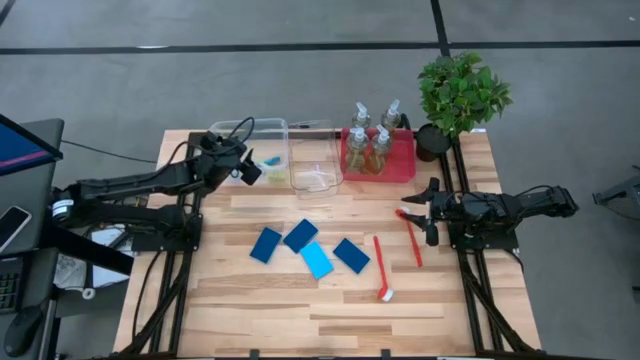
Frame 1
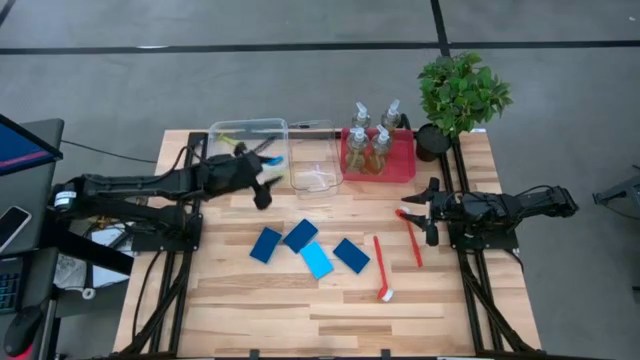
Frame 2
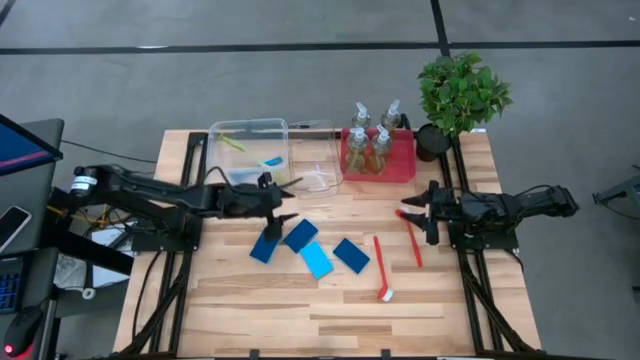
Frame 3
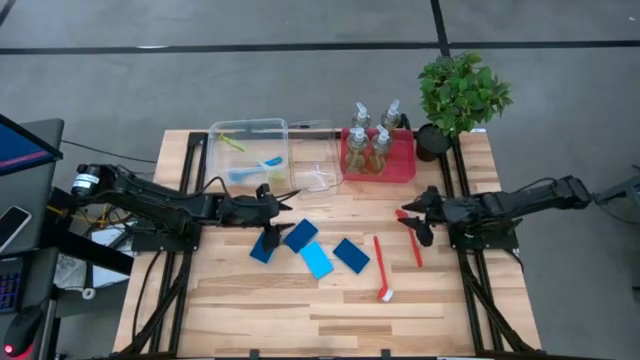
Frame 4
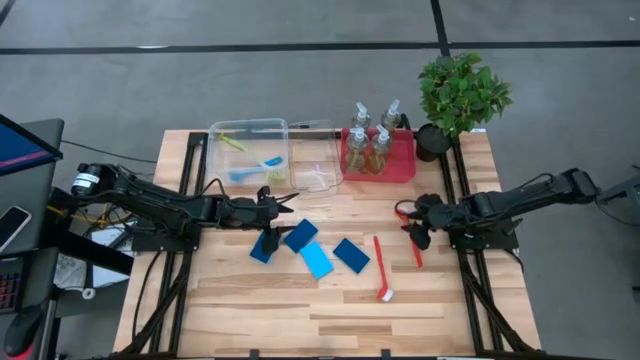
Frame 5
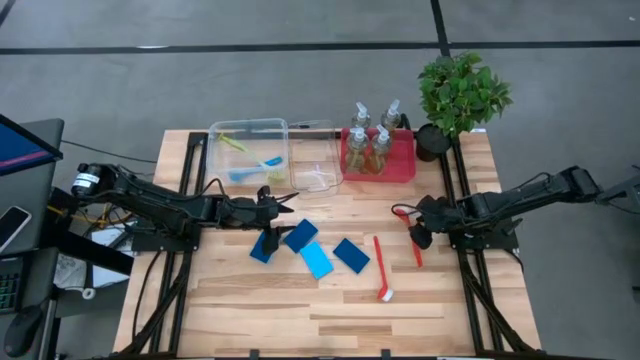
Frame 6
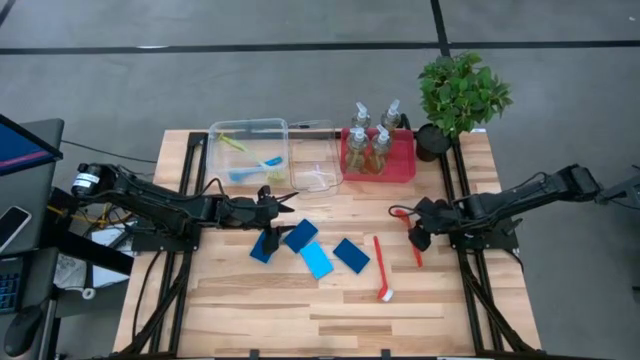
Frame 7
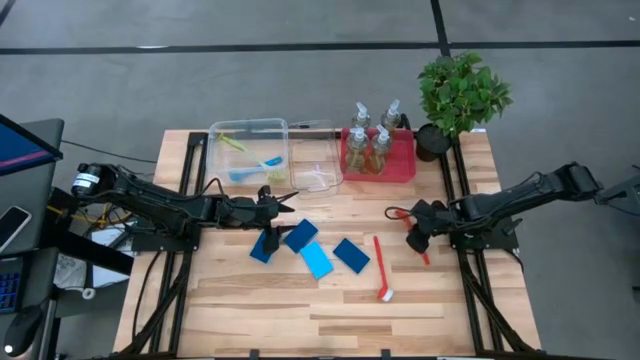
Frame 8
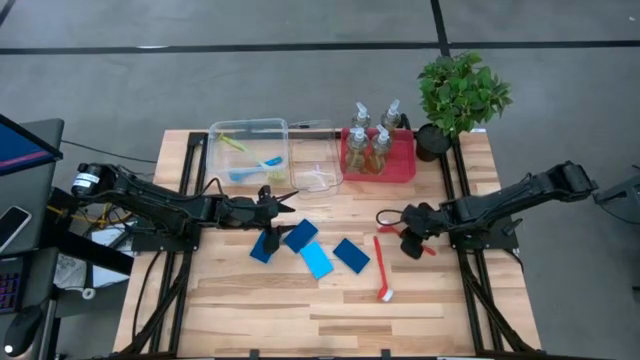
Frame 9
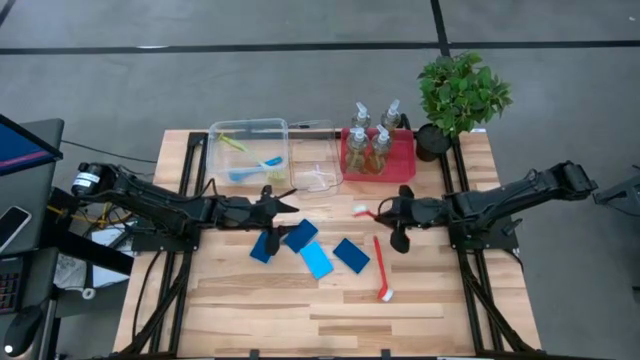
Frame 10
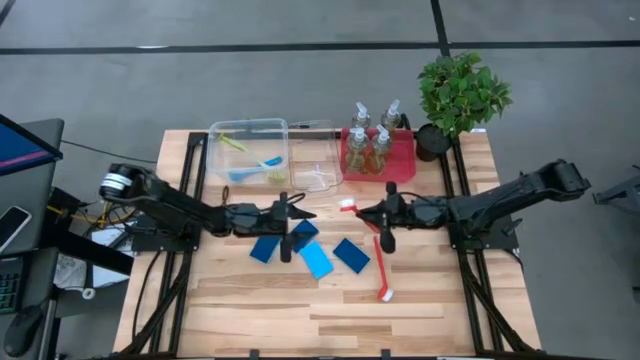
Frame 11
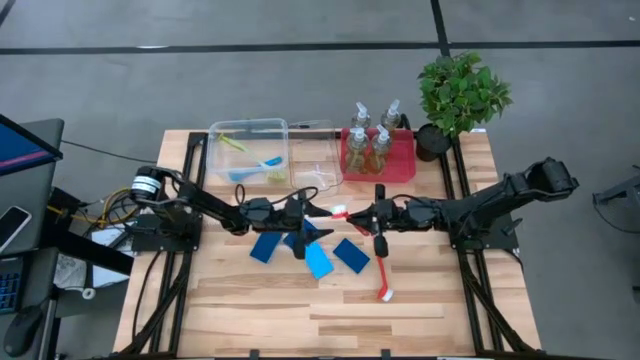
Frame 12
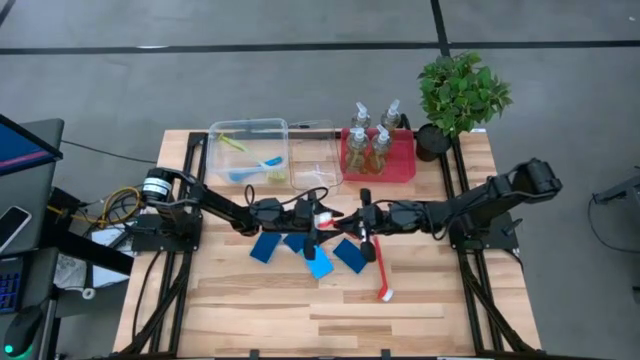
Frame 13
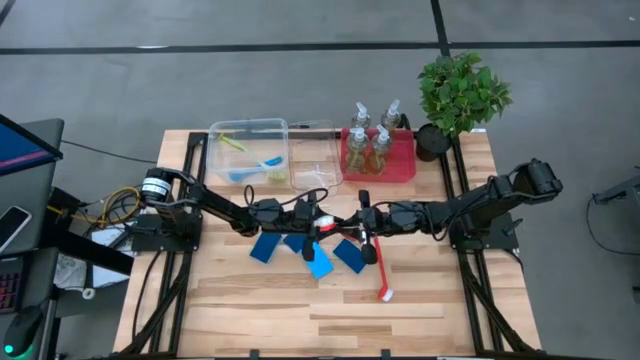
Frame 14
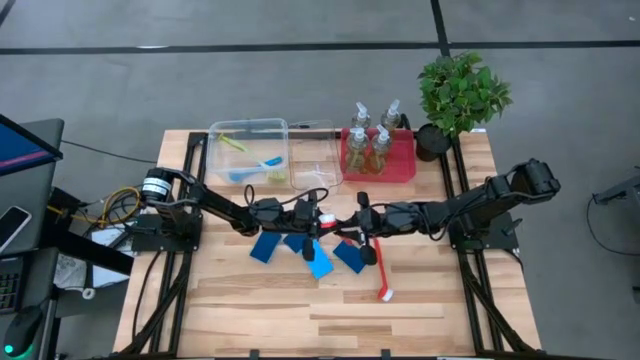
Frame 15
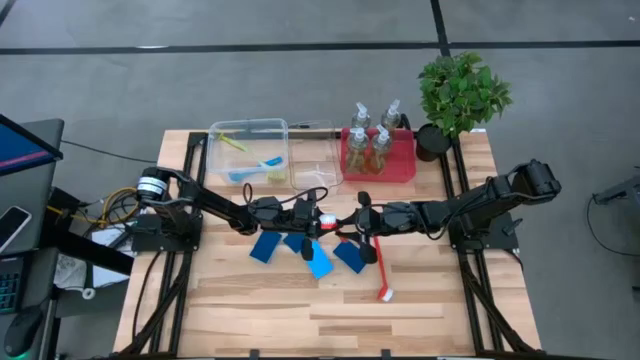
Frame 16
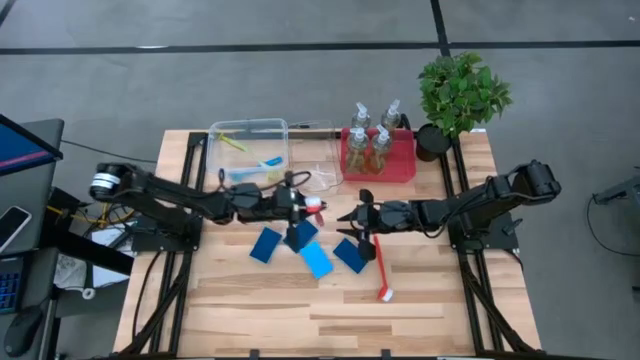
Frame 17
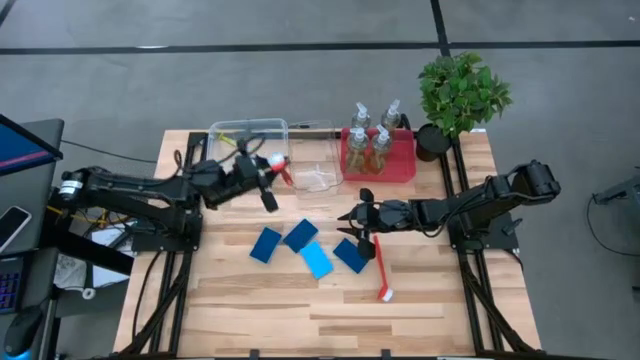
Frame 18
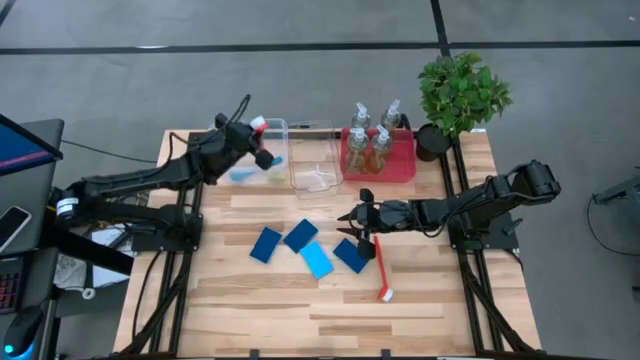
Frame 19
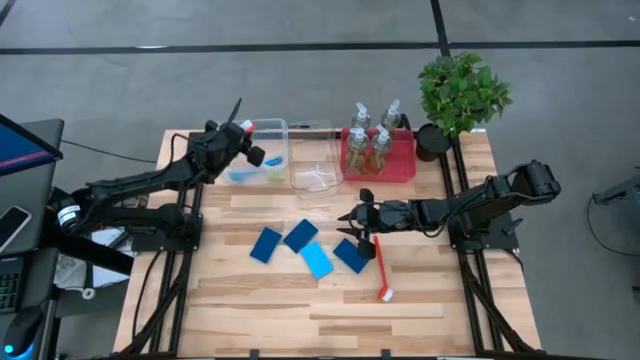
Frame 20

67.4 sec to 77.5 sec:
Task: Pick & Place Kitchen Sink Supplies
Put the red dish brush into the white bin

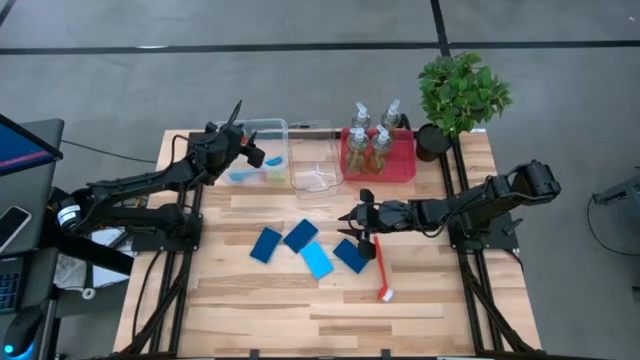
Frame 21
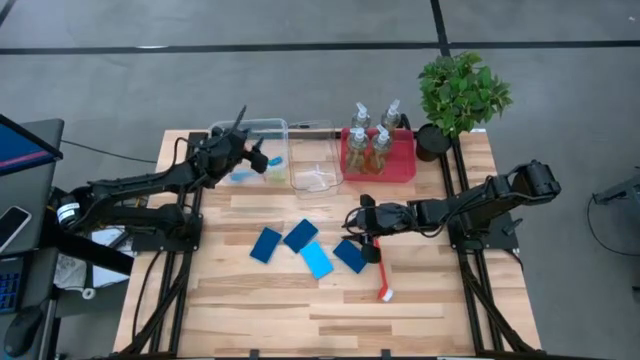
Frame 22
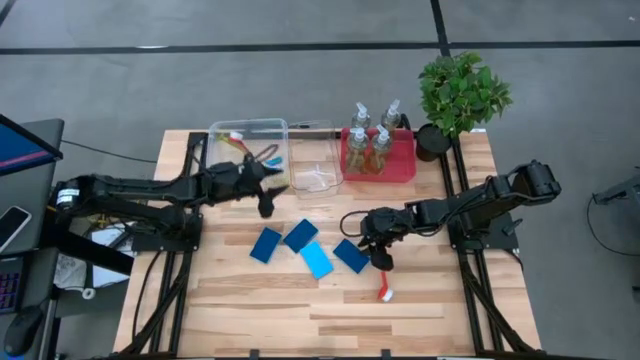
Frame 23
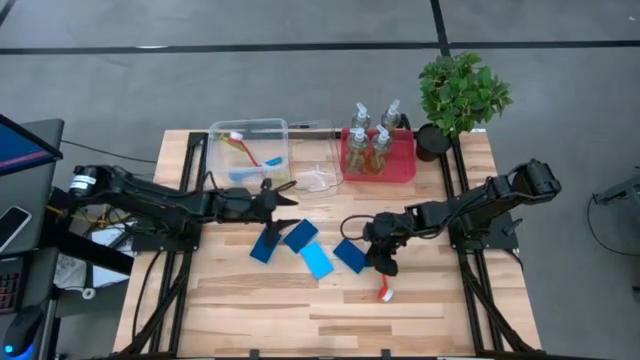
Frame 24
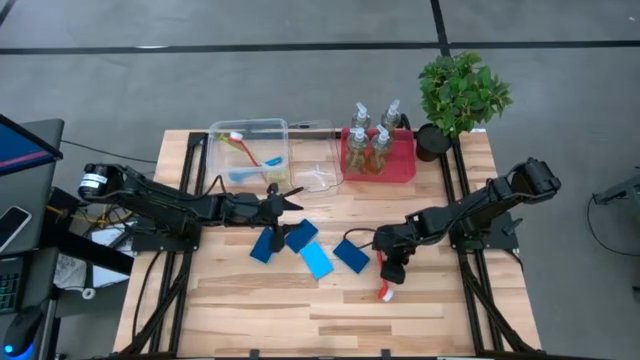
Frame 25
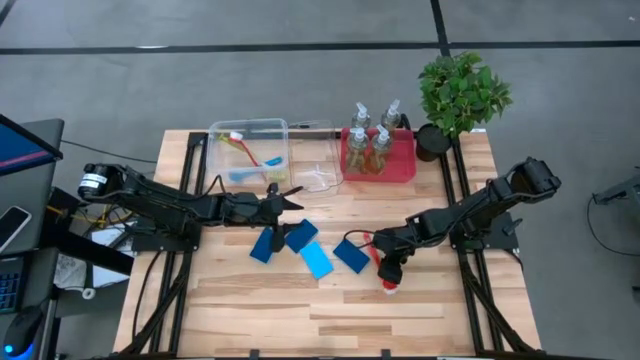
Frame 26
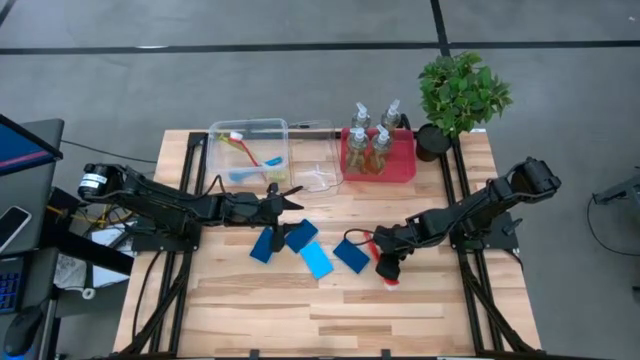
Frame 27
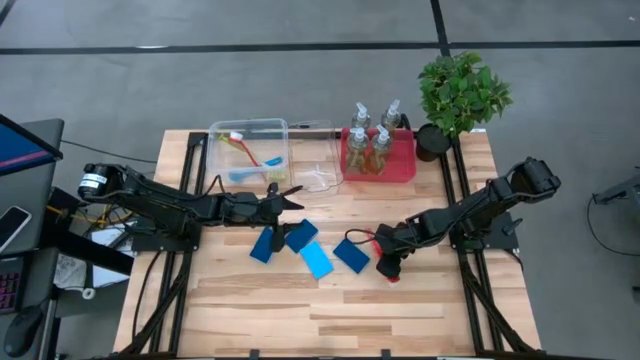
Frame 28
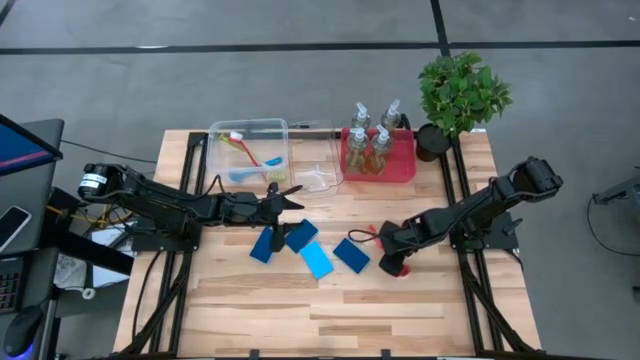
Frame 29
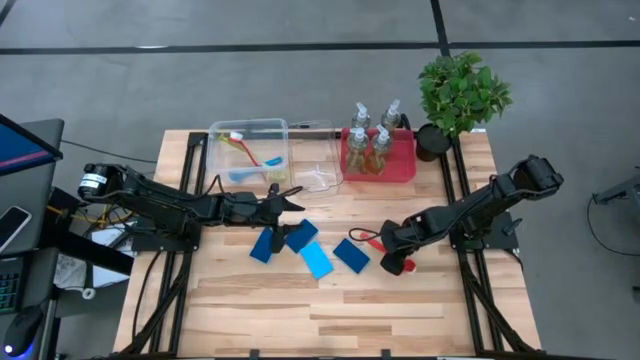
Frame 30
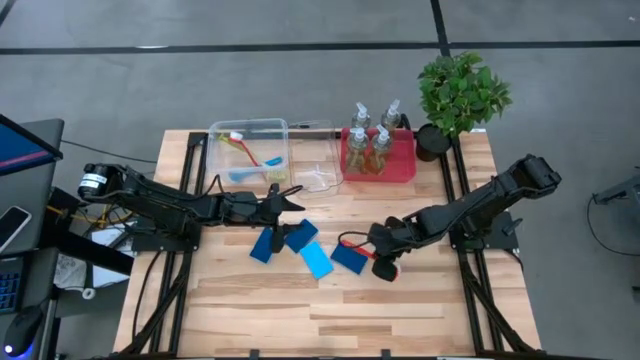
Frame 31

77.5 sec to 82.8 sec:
Put the red dish brush into the white bin

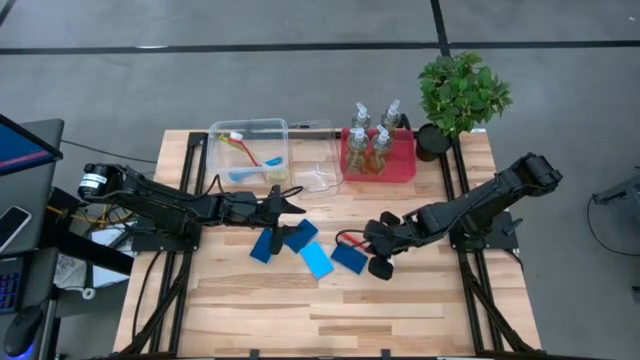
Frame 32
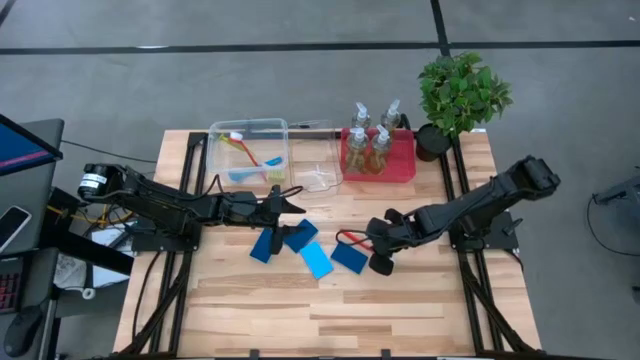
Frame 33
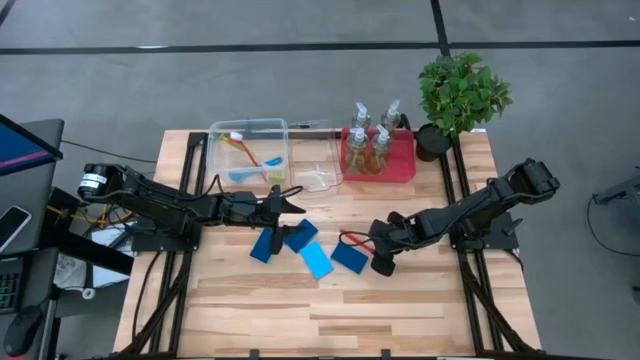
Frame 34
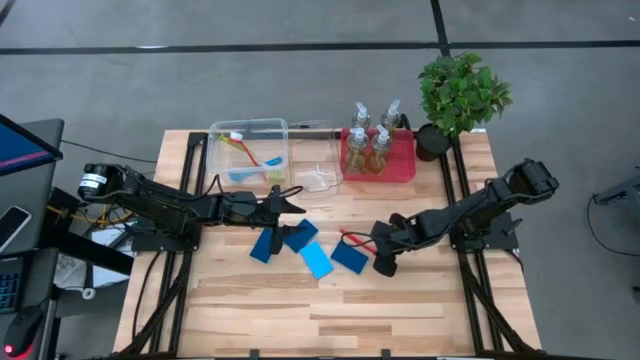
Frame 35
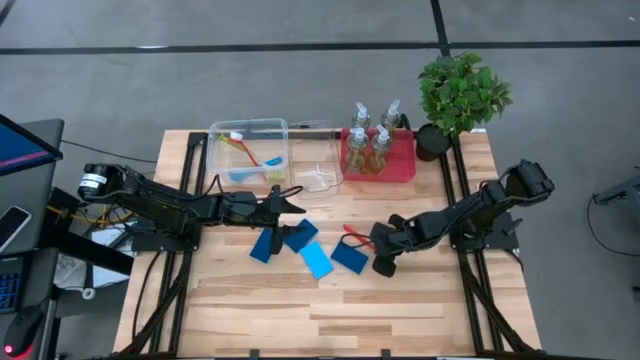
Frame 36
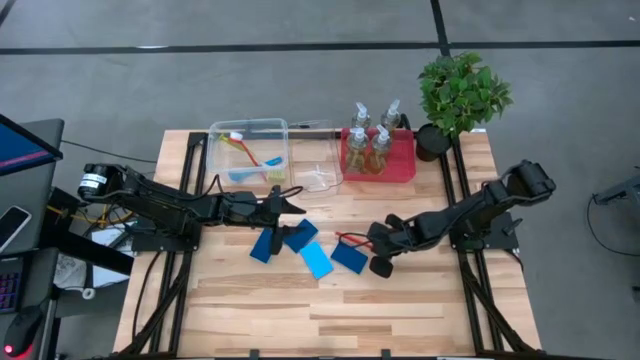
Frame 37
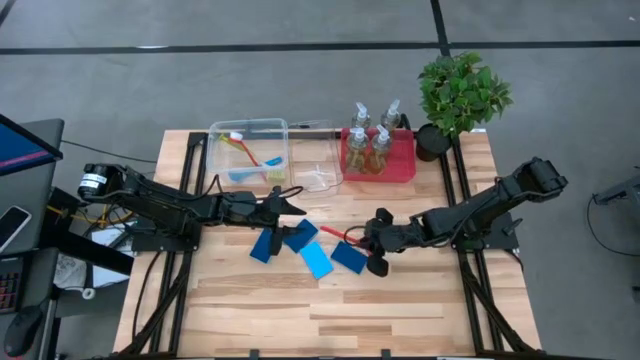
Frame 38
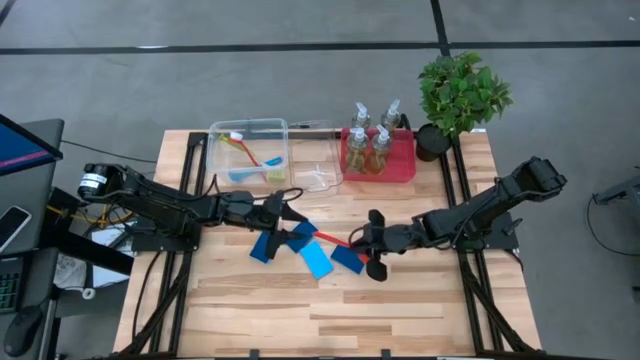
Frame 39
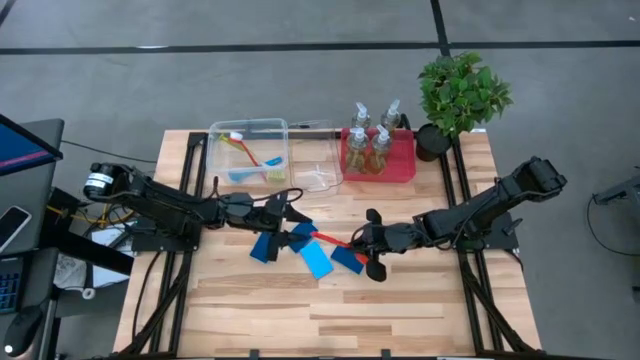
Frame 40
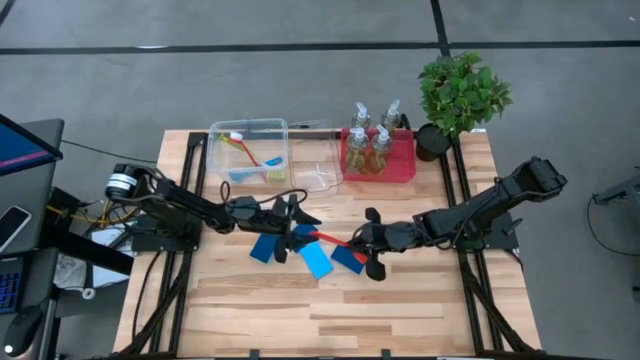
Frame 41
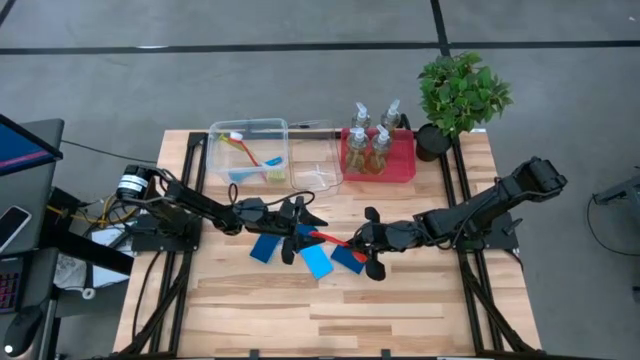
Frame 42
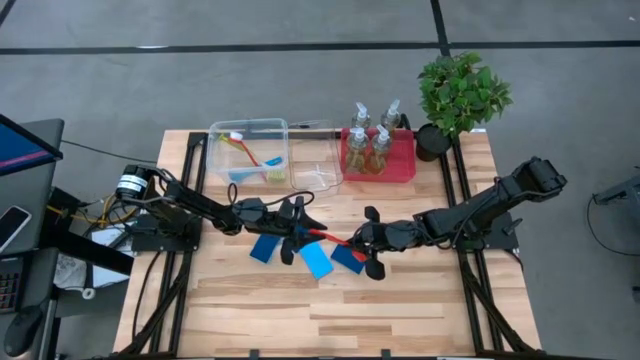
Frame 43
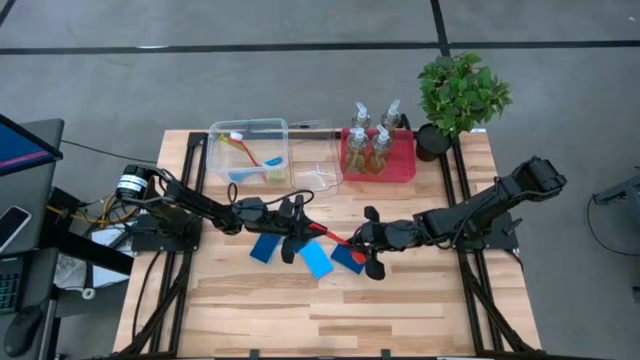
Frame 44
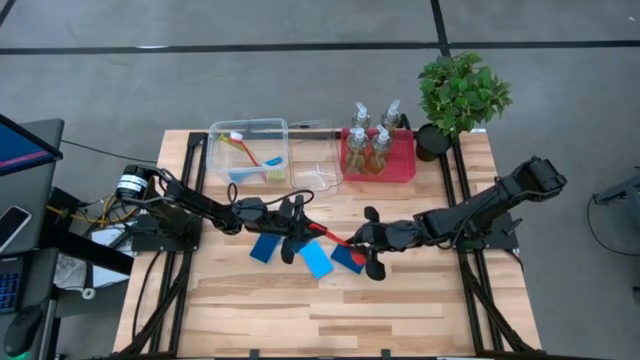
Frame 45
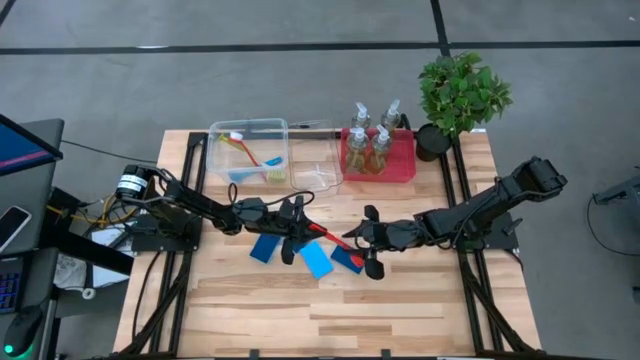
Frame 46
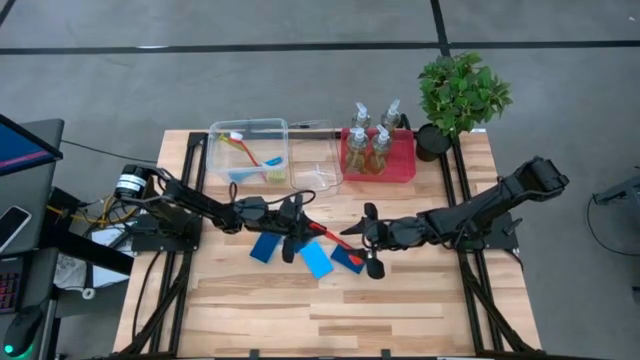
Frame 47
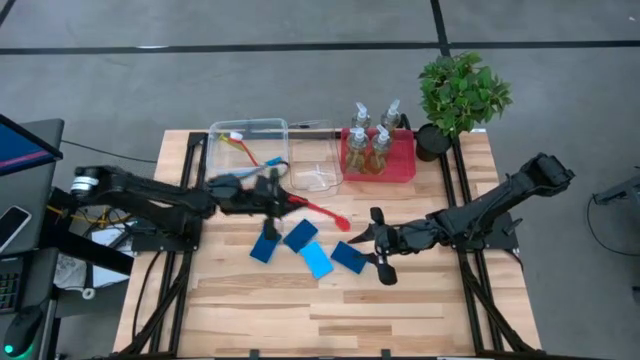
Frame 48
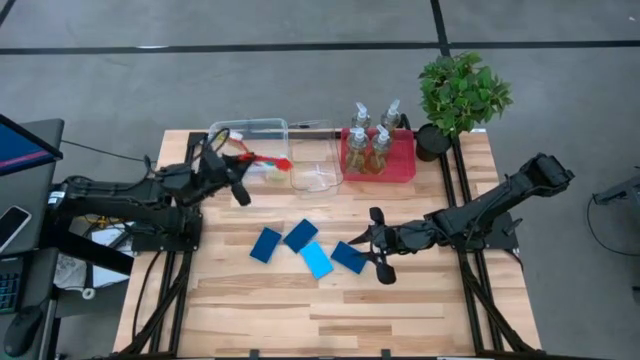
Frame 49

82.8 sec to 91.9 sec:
Put the red dish brush into the white bin
